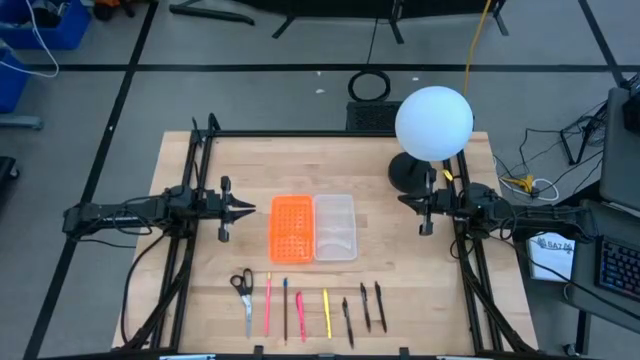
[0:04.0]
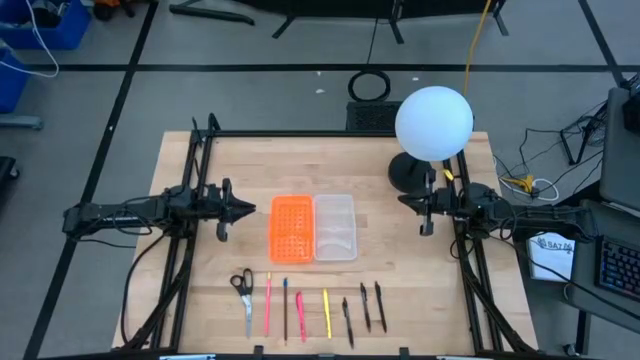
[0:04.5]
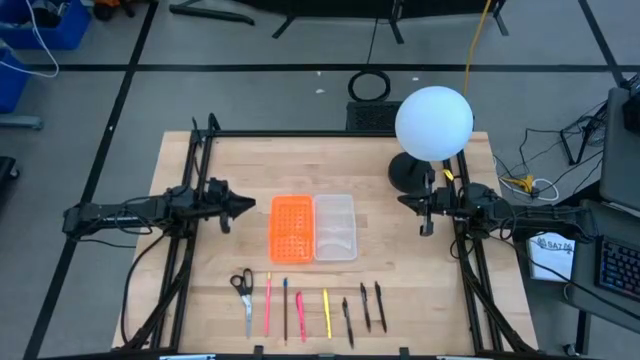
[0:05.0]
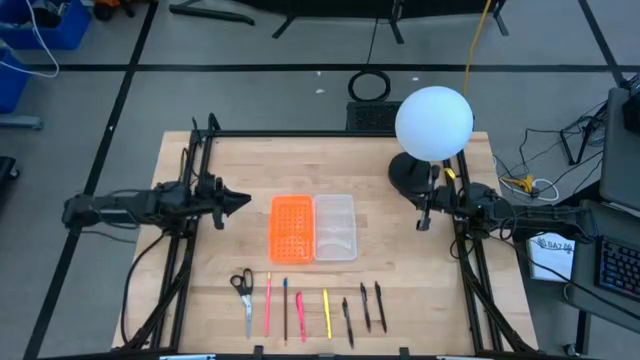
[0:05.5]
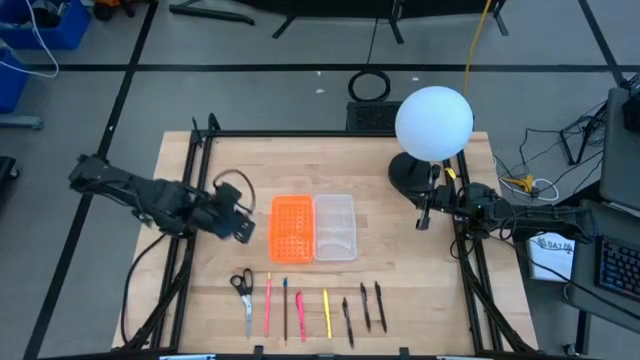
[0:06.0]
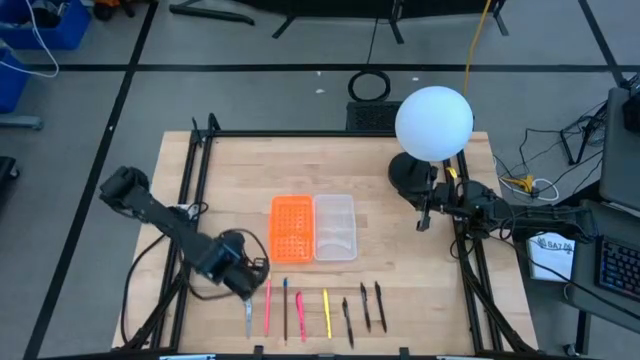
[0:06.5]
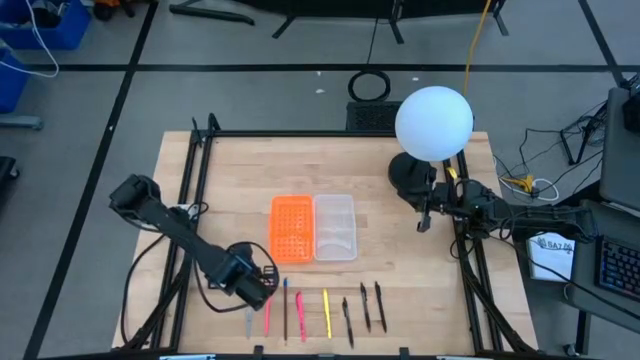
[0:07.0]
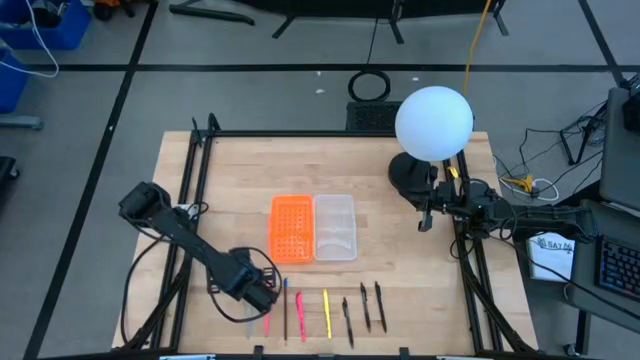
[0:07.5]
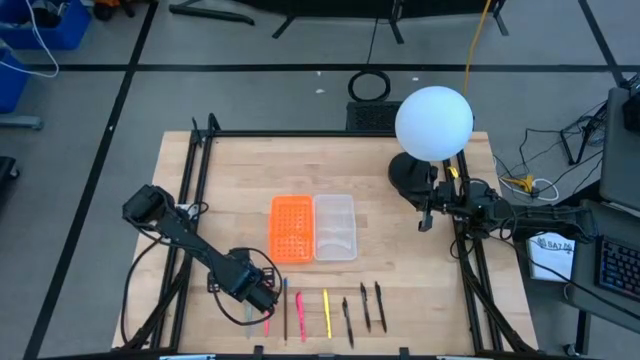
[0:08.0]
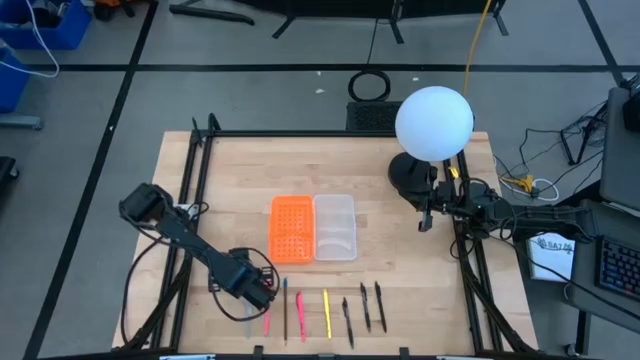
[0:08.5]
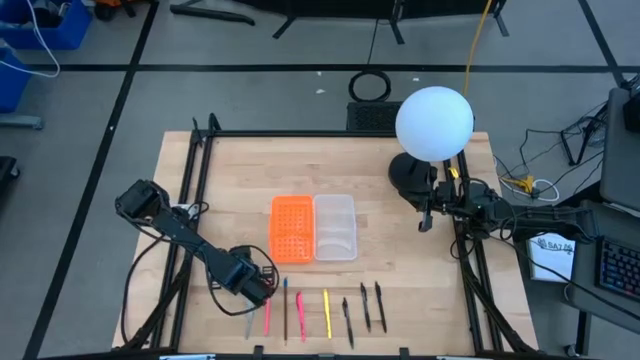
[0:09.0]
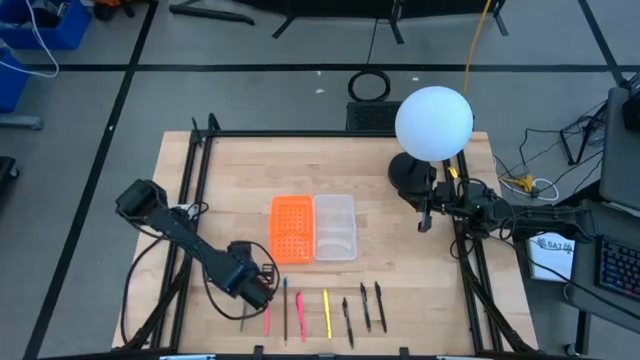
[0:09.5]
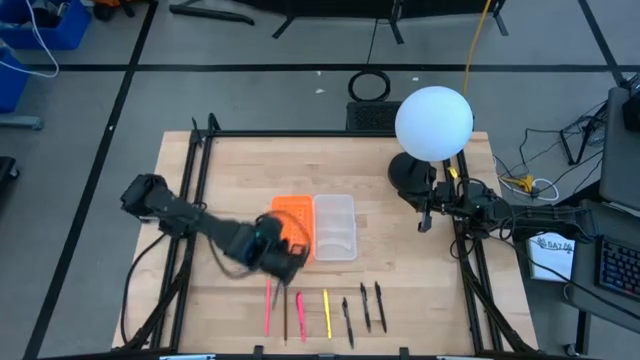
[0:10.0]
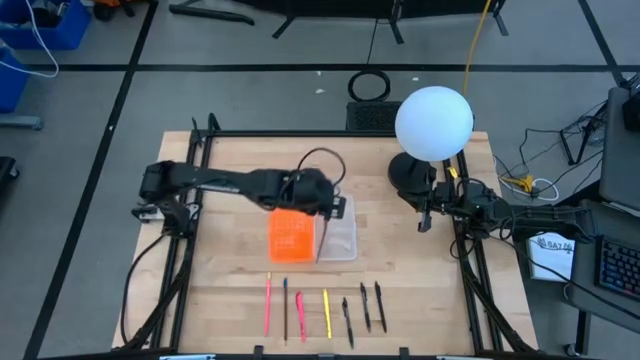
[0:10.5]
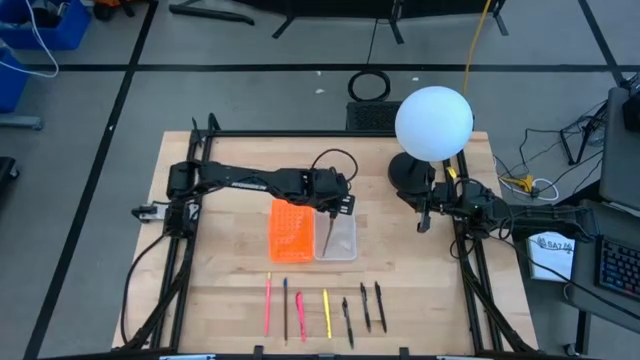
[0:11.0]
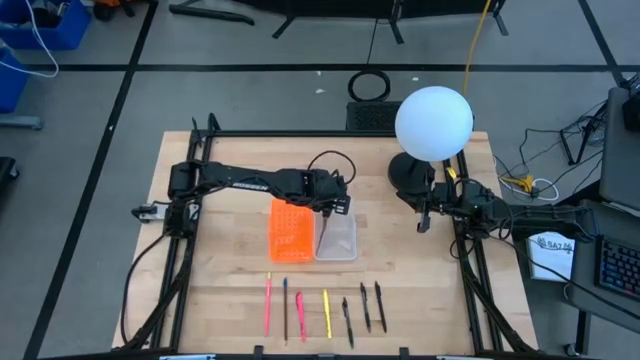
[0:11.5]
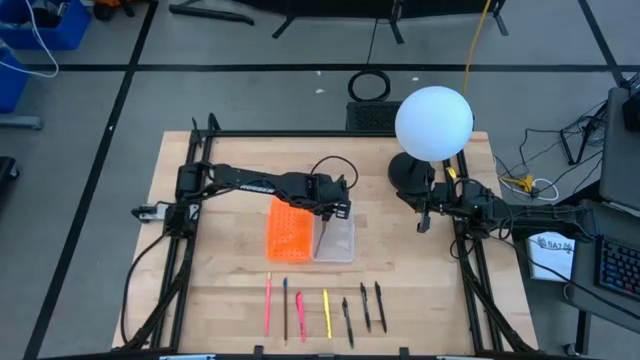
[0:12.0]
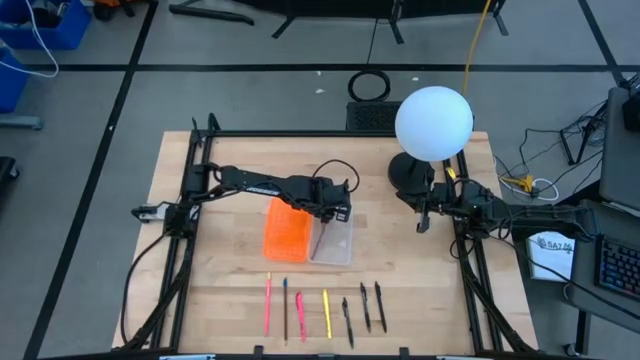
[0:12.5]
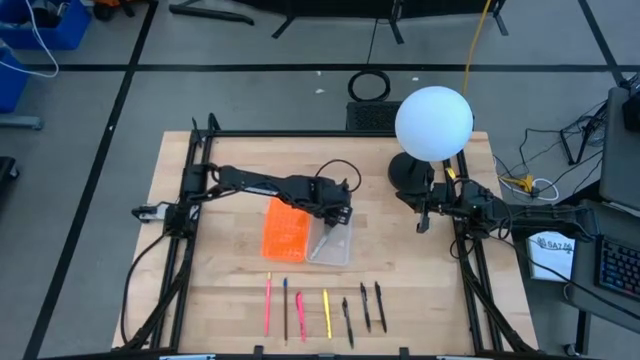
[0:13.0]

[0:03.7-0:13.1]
Task: Pick & place school supplies into a supply box
Put the black scissors into the supply box

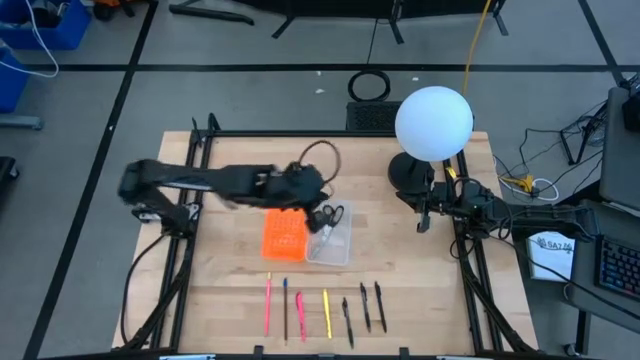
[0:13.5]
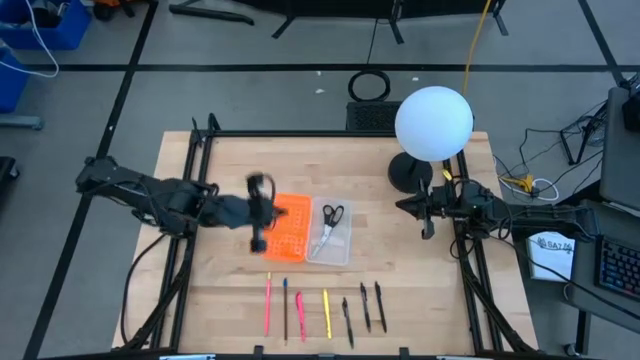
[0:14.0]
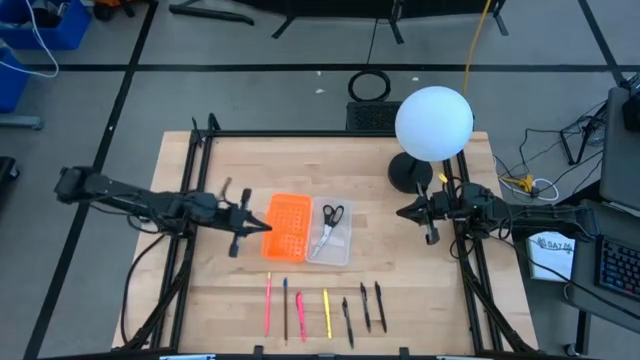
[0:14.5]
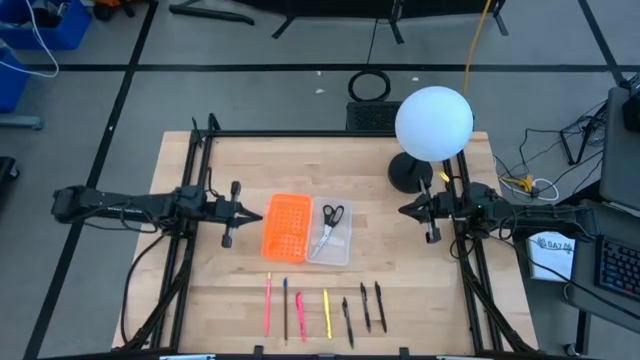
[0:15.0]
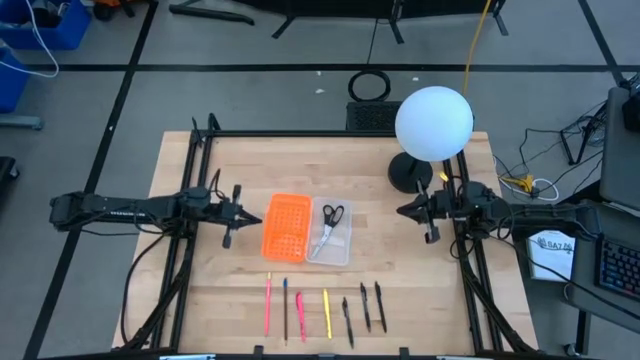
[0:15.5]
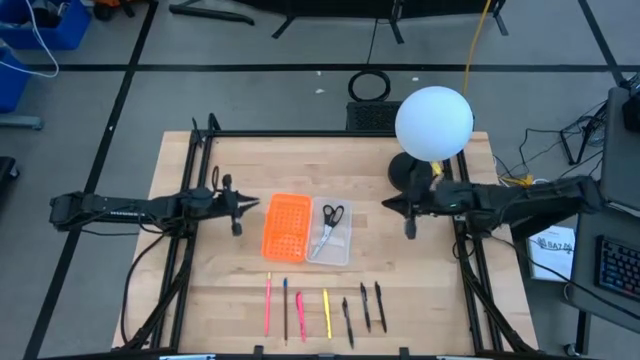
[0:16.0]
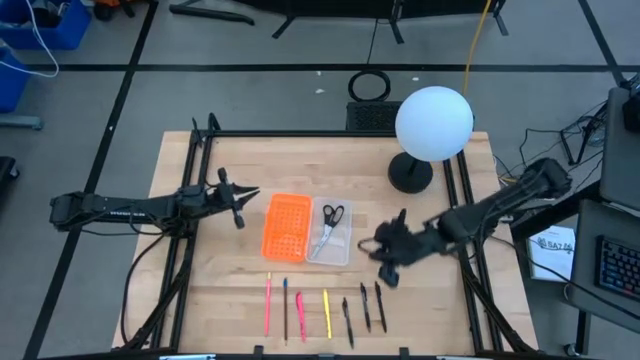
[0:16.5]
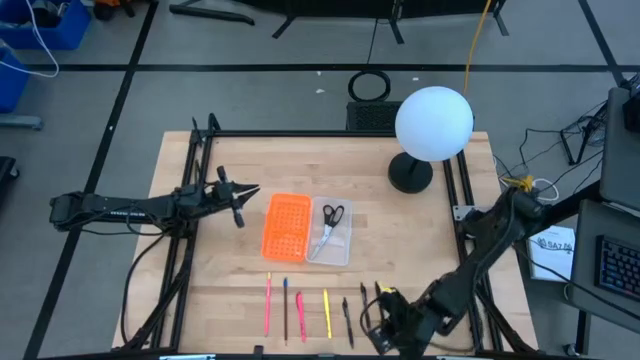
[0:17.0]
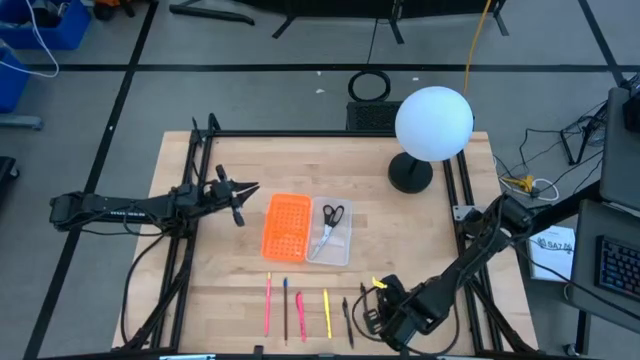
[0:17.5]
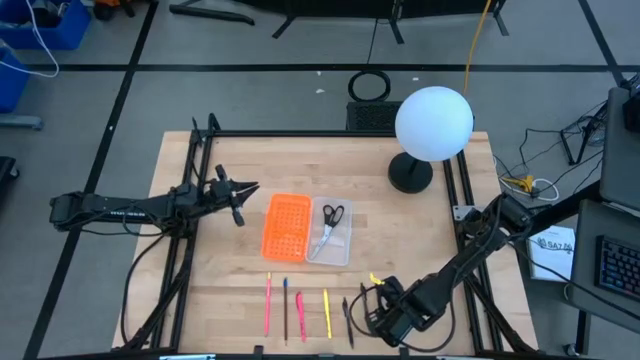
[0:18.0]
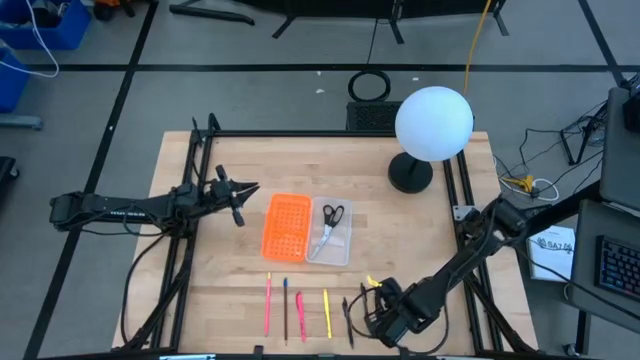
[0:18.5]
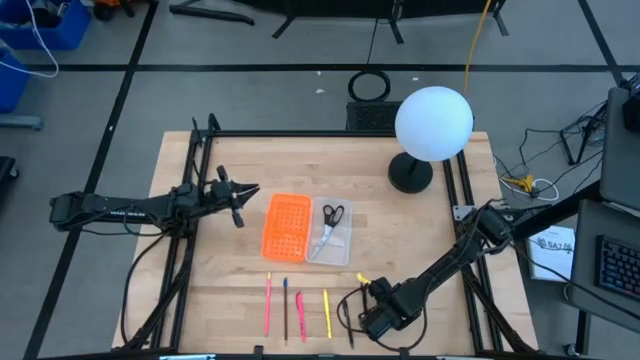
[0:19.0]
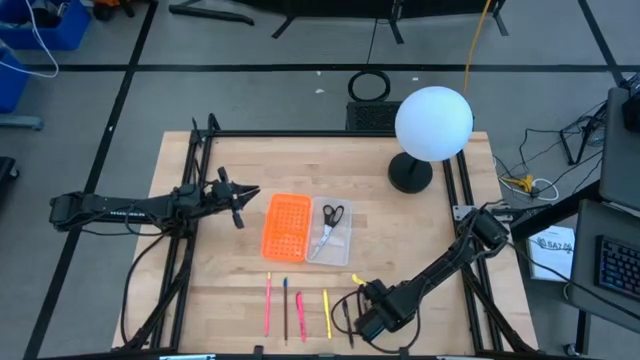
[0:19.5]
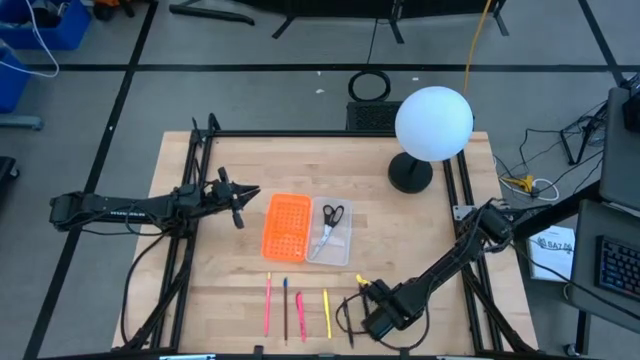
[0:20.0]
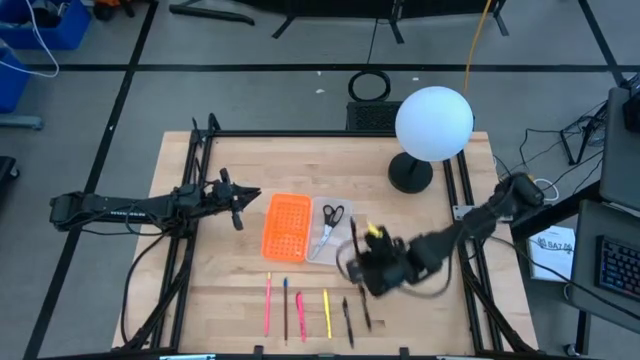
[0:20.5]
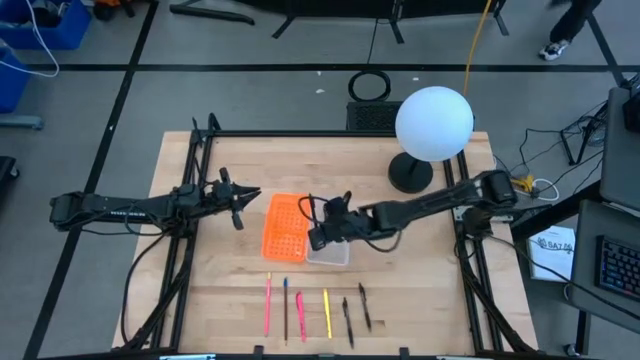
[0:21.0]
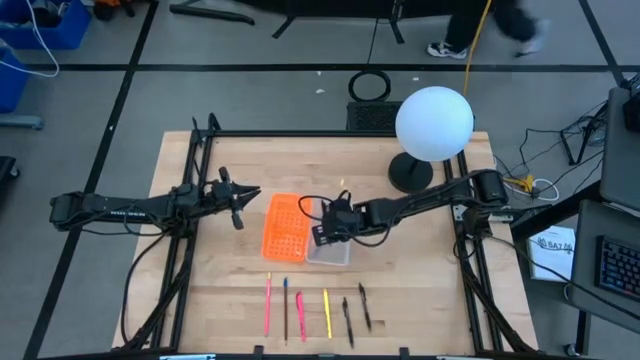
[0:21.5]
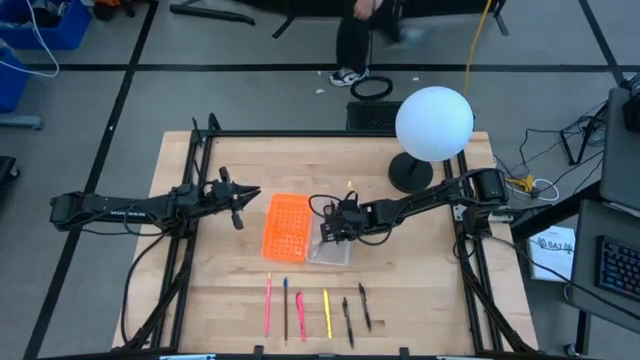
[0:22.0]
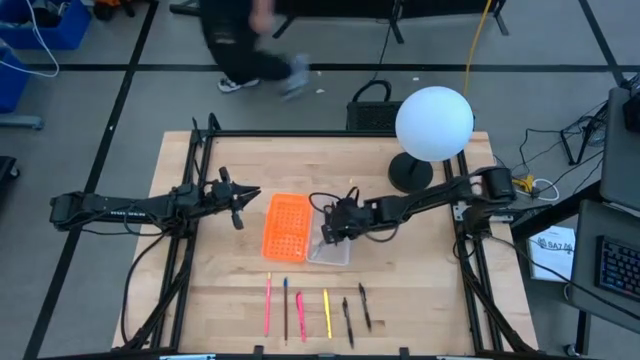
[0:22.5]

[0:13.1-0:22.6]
Put the right black pen into the supply box

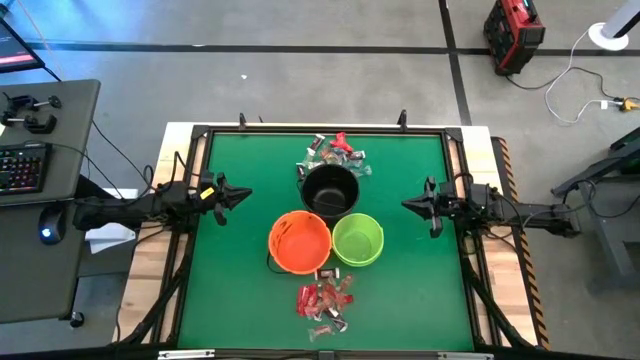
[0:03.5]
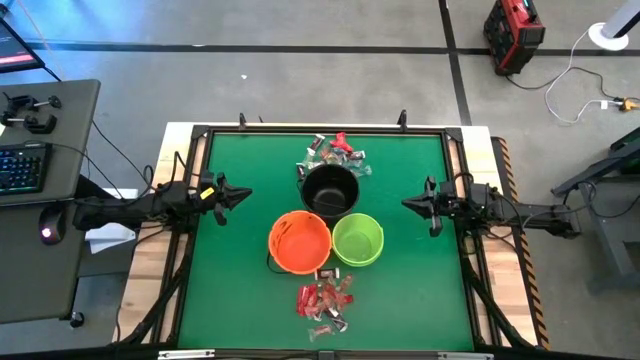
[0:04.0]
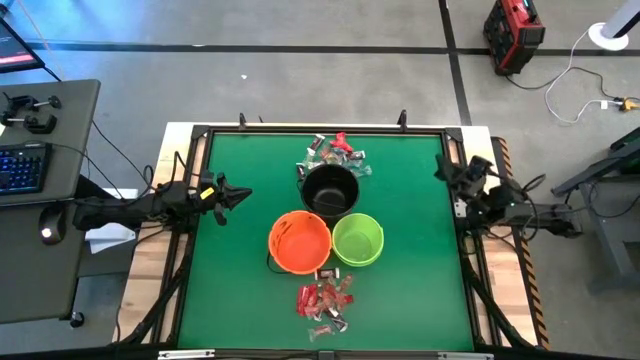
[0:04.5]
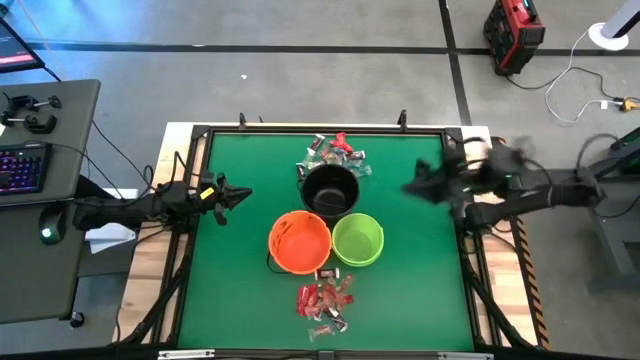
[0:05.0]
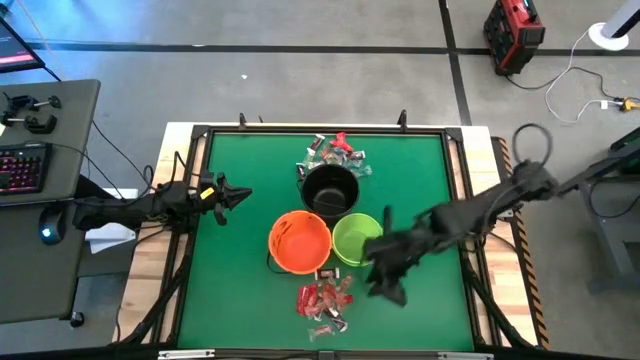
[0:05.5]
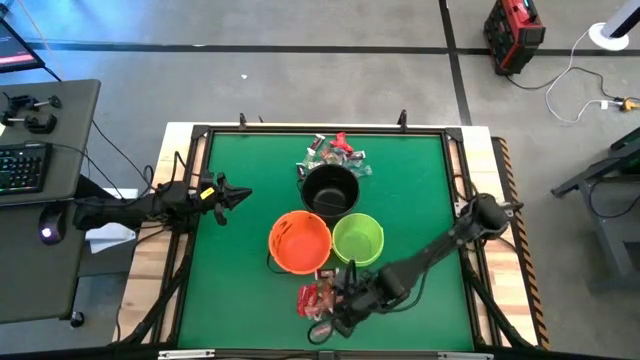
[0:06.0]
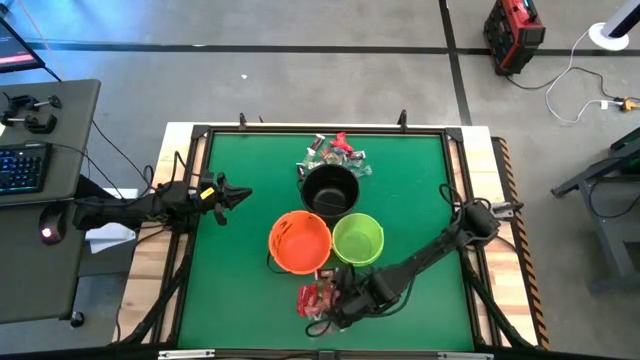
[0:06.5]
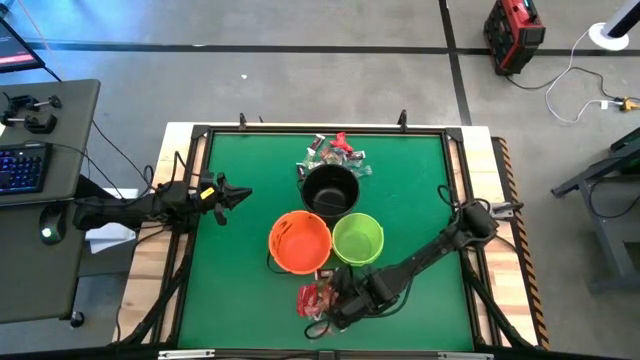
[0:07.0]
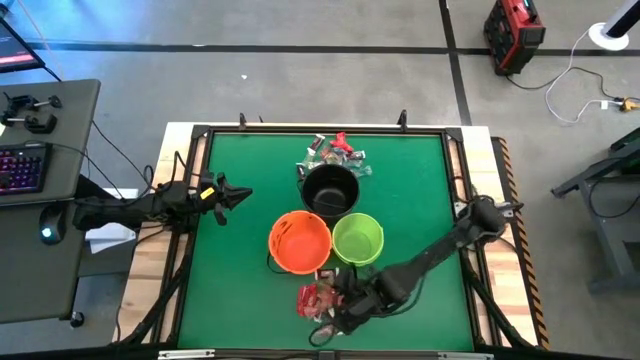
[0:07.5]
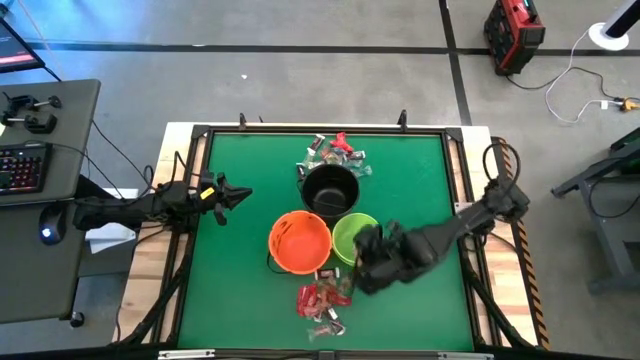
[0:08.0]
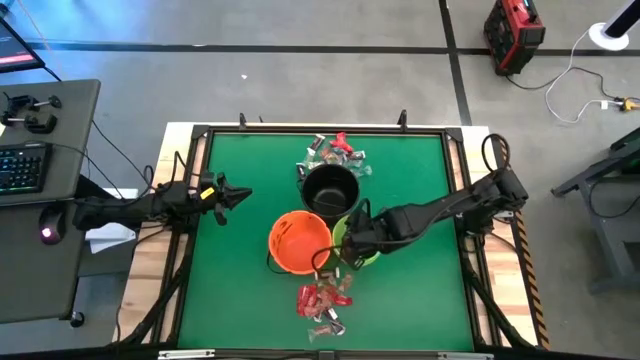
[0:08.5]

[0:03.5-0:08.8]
Task: Sort candy by brand, put in halloween buckets
Put the orange gummy into the green bucket
